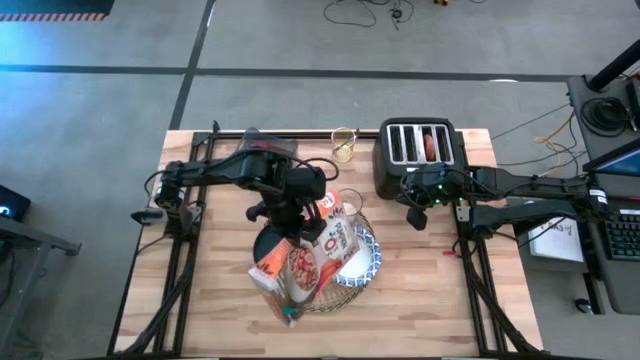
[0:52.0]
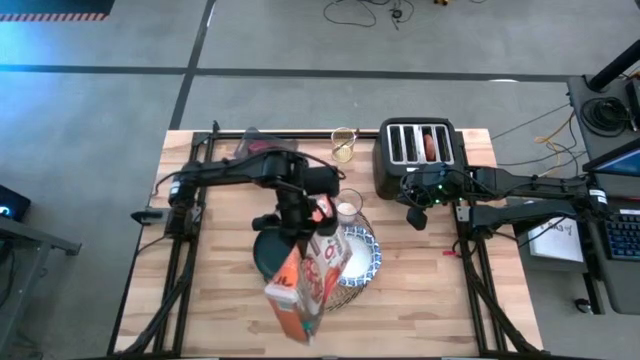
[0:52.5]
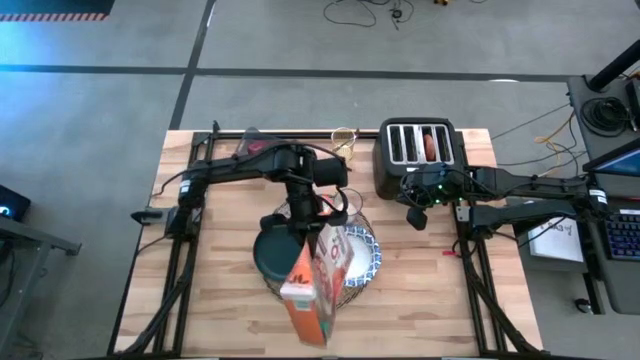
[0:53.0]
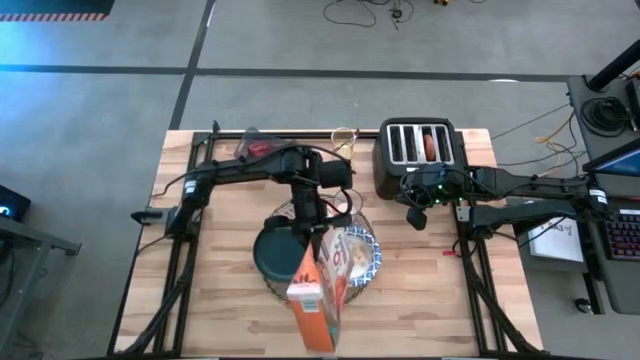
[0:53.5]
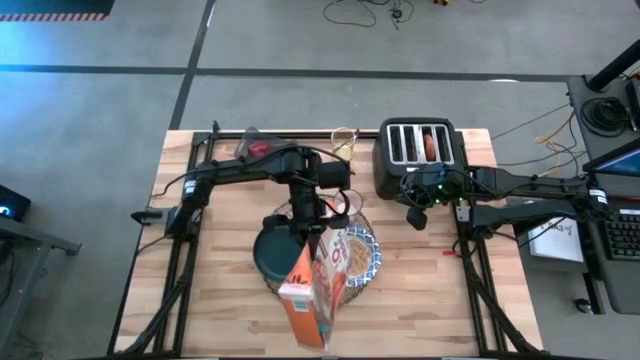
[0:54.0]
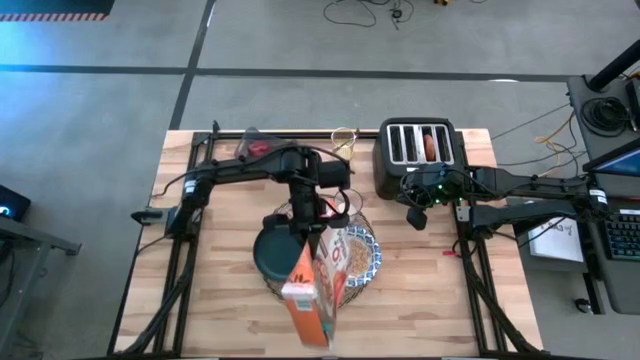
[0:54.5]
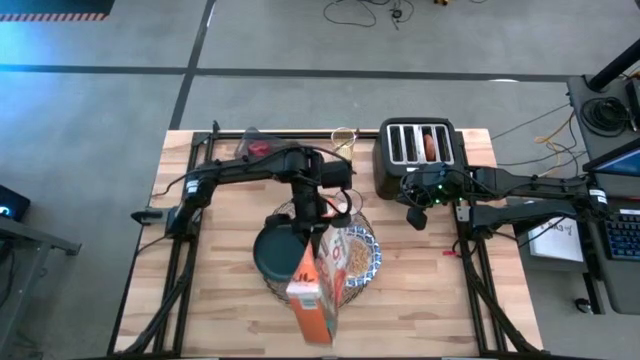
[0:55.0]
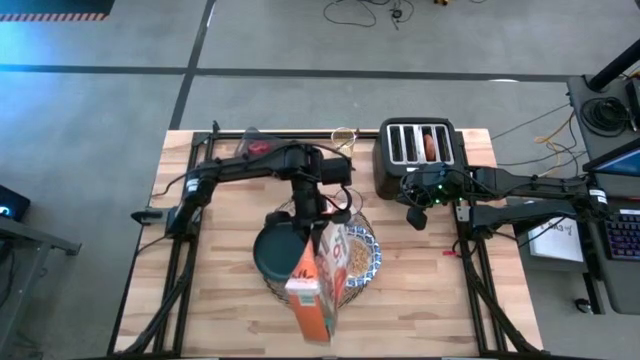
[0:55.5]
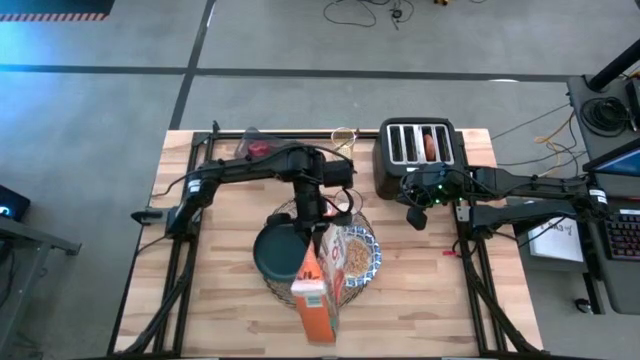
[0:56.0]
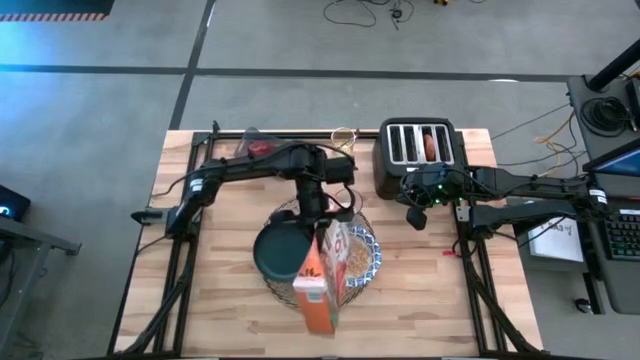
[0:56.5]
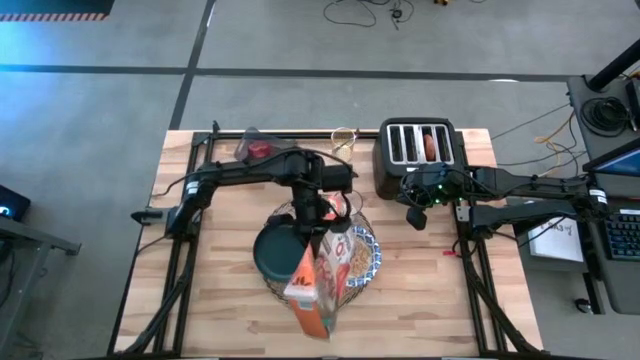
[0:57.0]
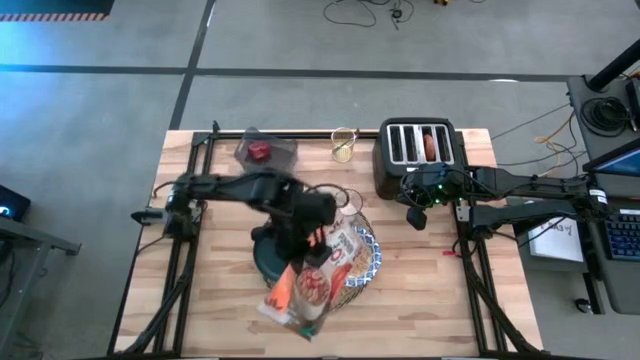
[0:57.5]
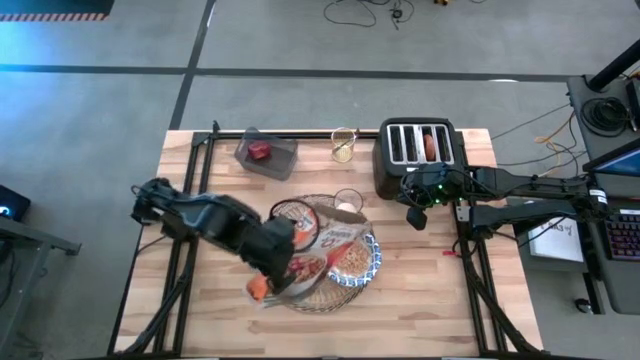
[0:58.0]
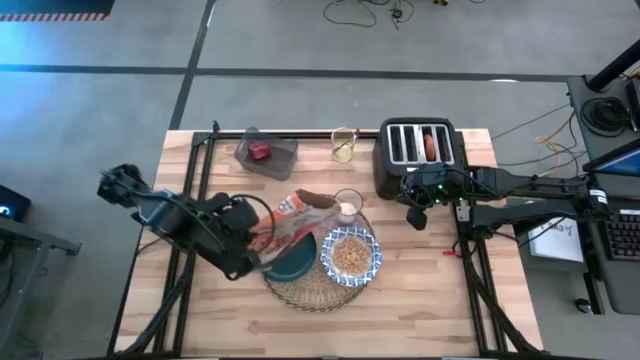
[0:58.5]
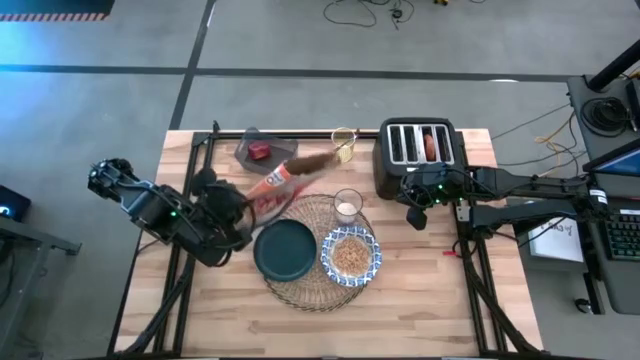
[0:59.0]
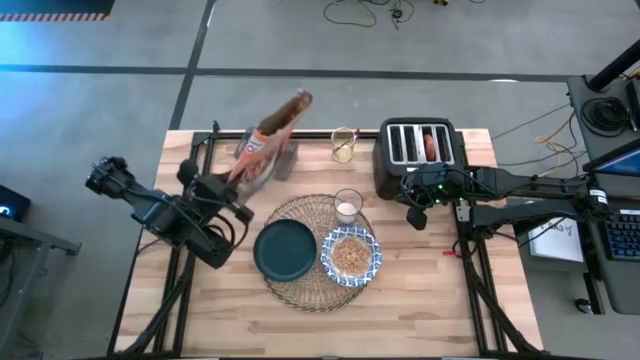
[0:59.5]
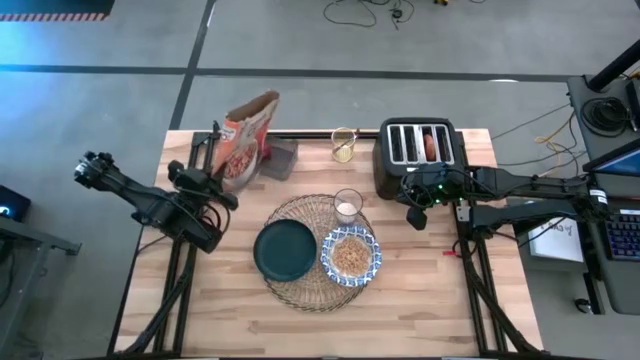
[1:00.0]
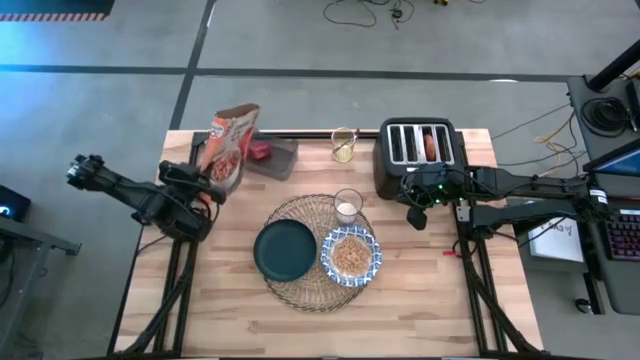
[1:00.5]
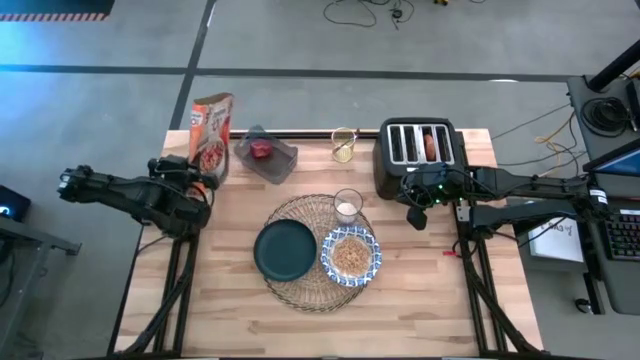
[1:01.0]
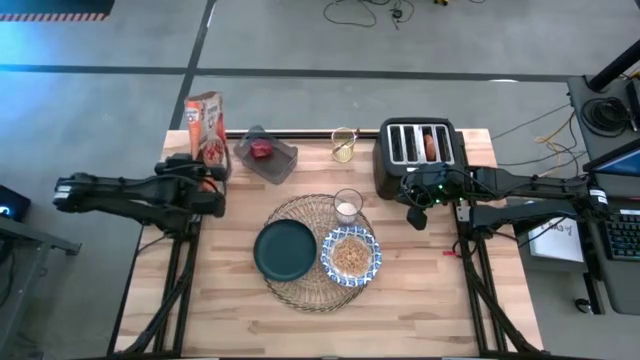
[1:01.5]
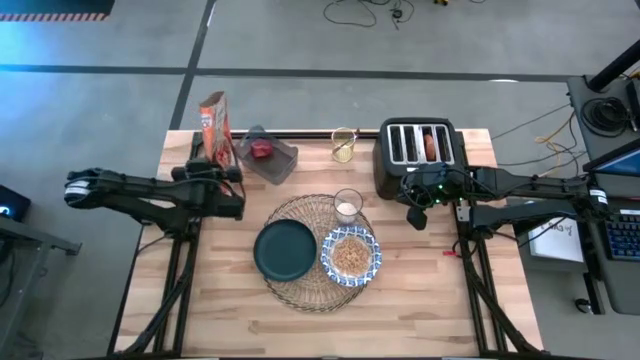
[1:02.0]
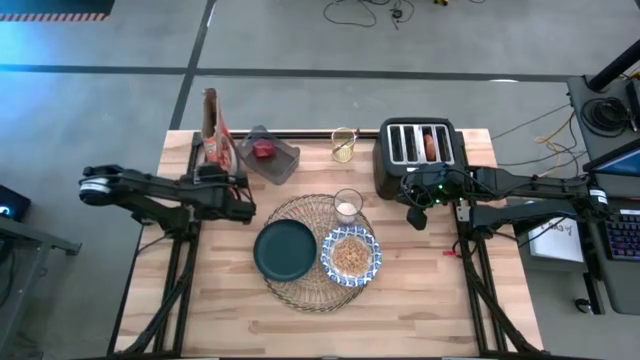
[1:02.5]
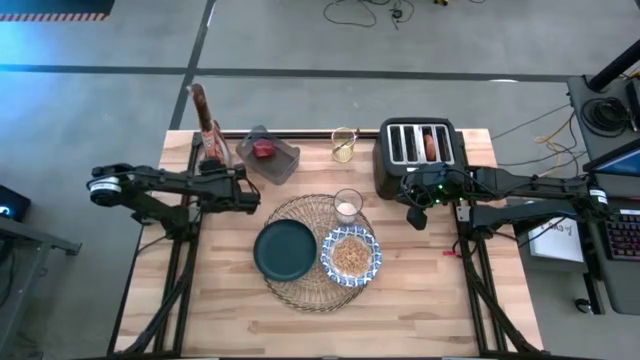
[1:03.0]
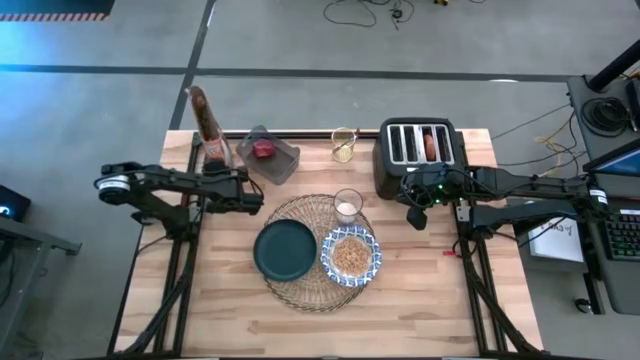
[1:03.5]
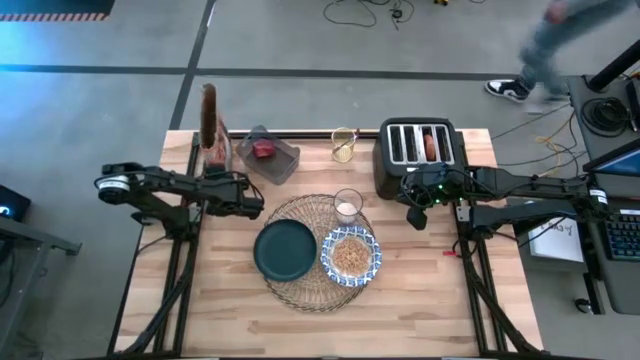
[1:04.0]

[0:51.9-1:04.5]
Task: Arrange a breakfast setting
Pour the cereal into the white patterned bowl

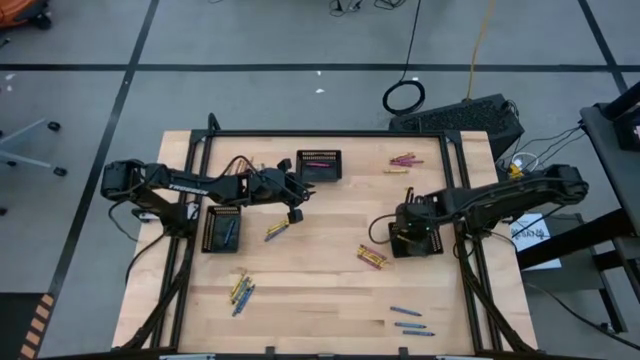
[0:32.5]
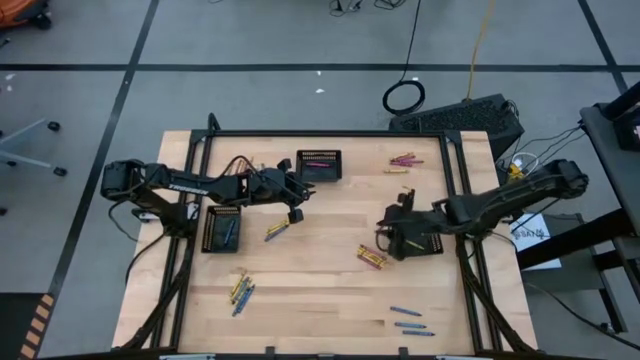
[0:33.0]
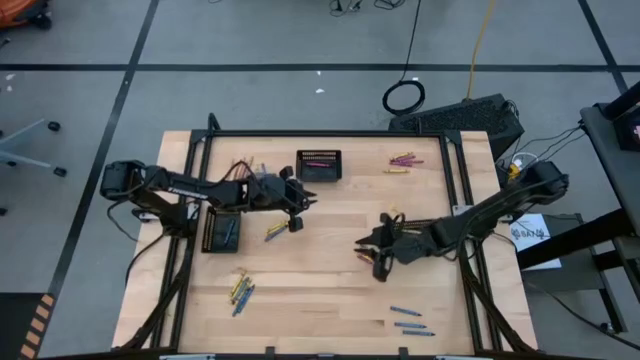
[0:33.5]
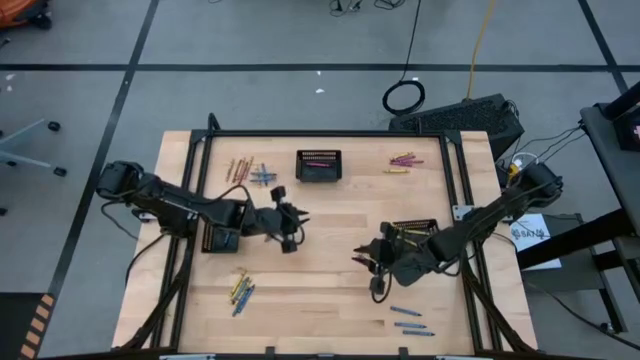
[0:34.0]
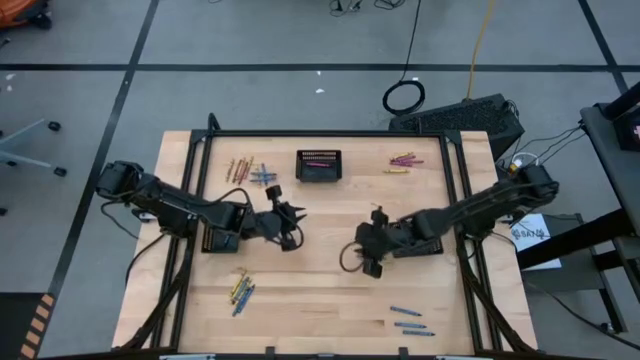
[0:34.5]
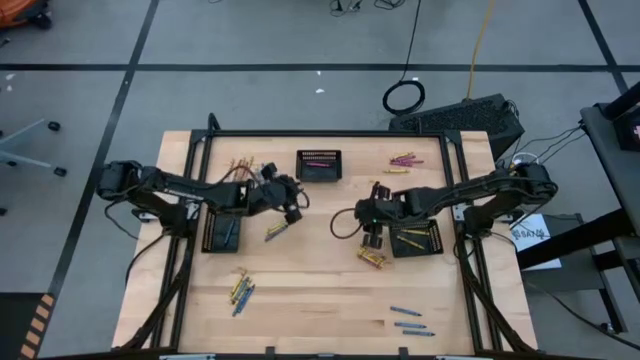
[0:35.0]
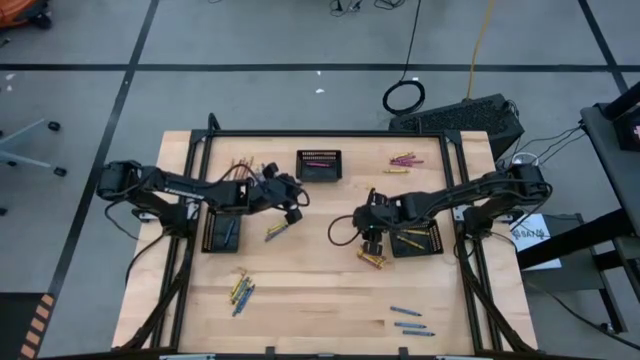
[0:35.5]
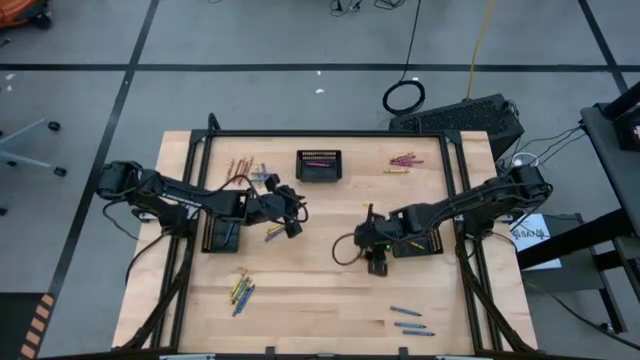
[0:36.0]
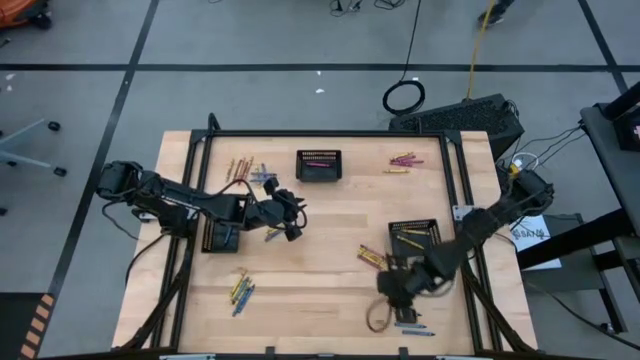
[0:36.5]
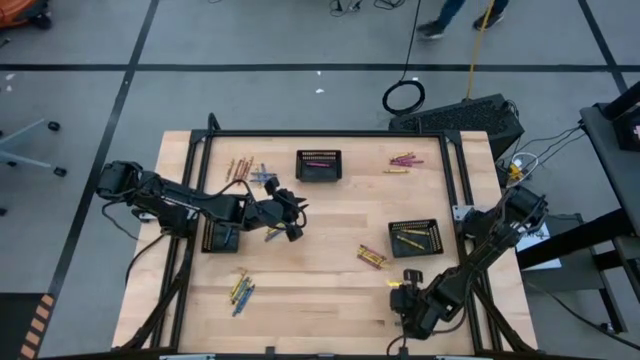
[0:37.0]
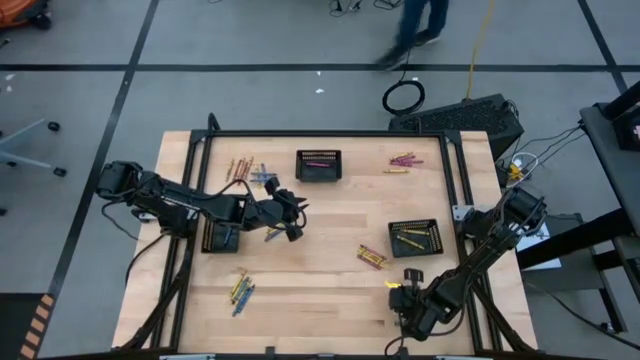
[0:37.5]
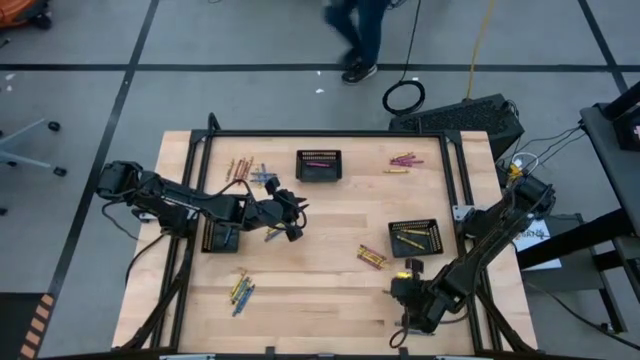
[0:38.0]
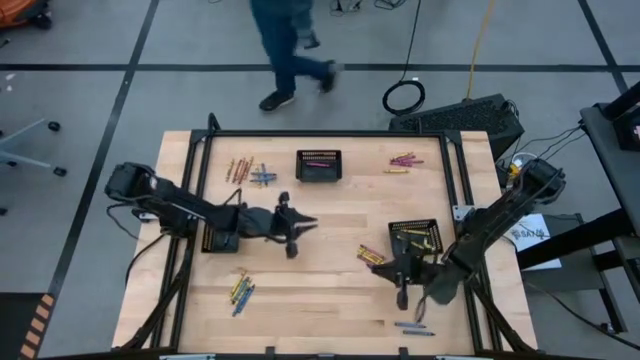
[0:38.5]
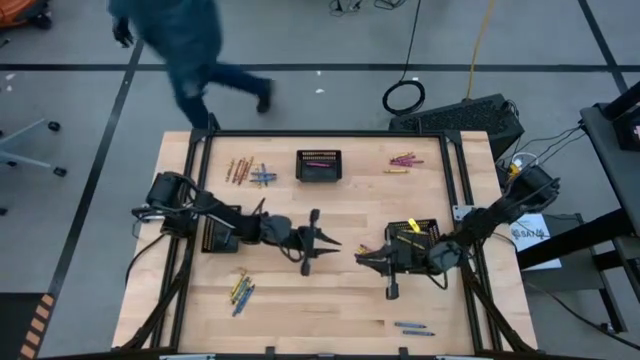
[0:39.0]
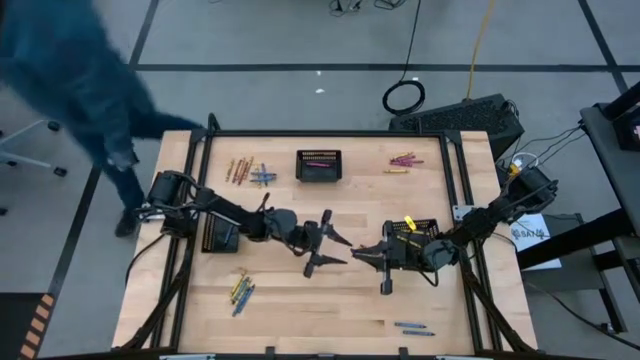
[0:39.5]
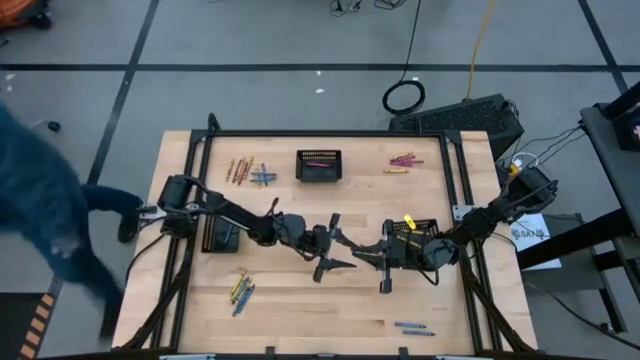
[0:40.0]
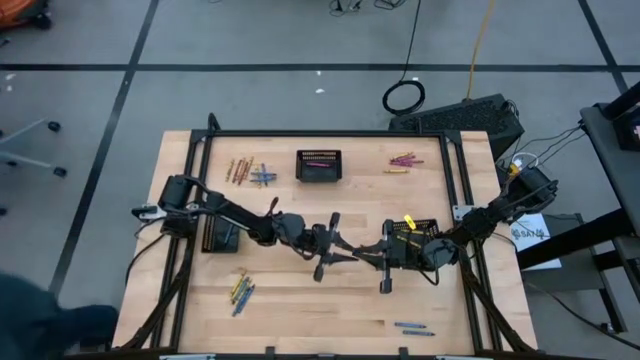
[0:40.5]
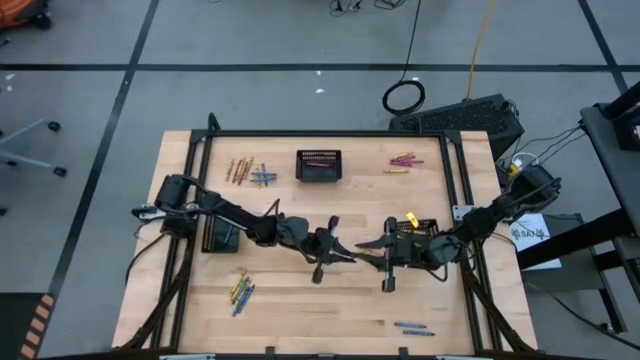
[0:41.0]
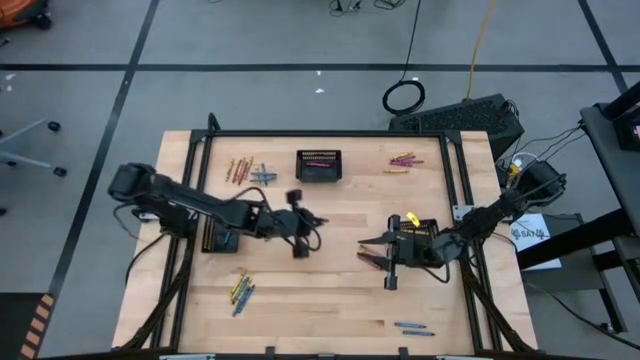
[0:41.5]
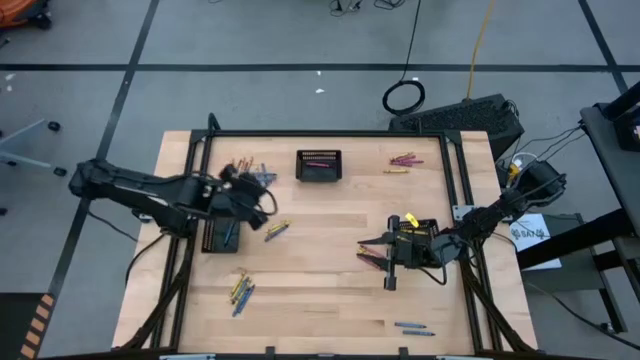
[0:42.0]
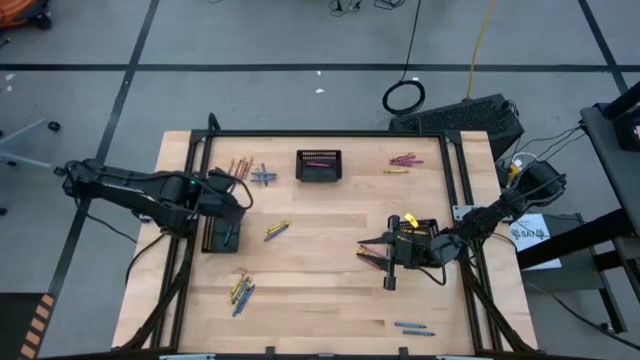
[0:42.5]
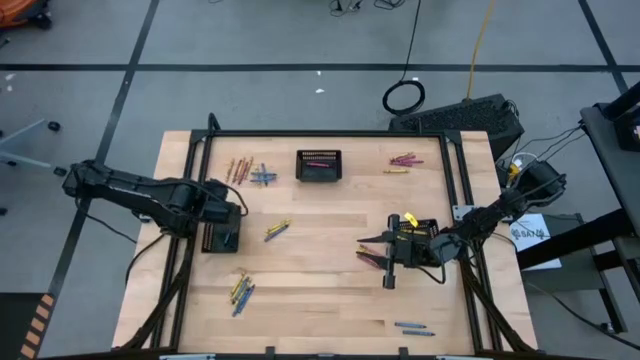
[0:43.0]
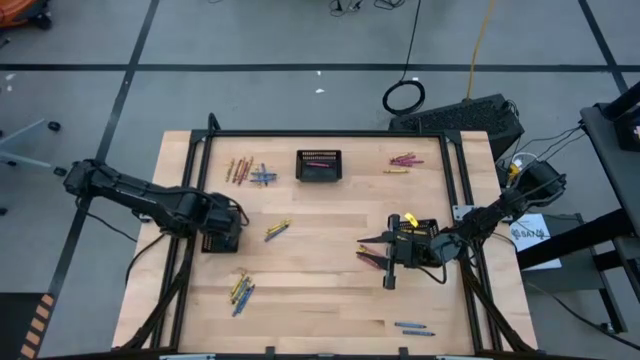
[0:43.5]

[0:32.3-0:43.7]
Task: Sort crayons
Put the blue crayon into the bottom left black bin
